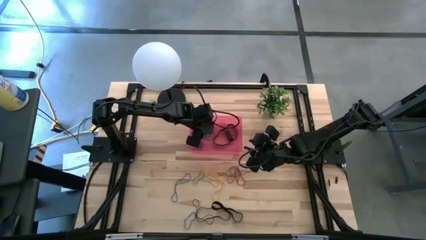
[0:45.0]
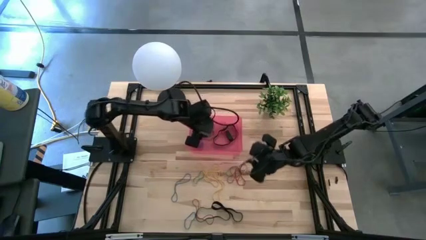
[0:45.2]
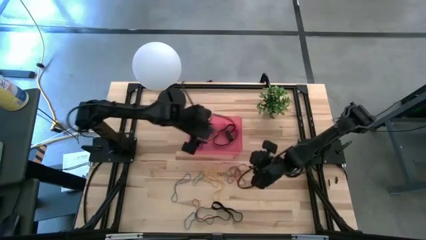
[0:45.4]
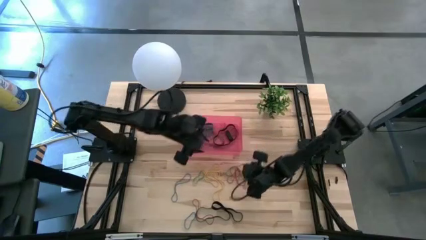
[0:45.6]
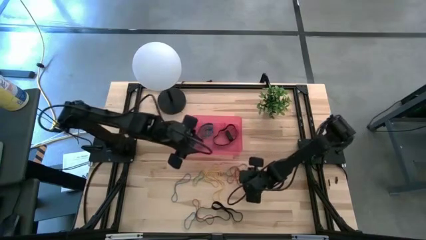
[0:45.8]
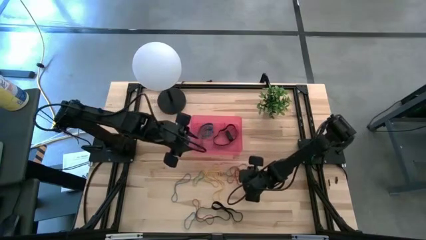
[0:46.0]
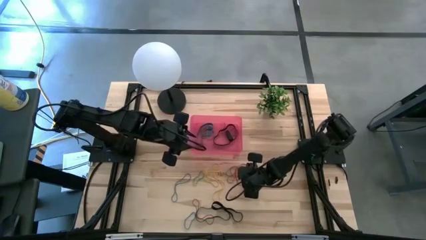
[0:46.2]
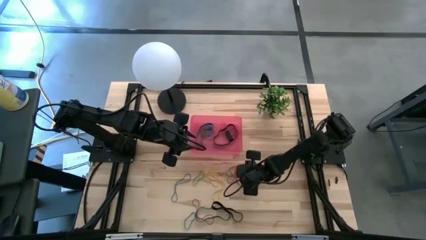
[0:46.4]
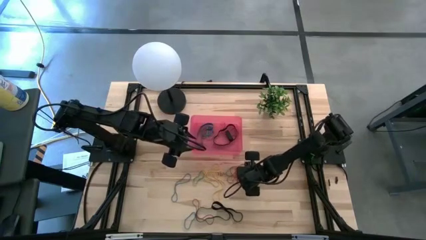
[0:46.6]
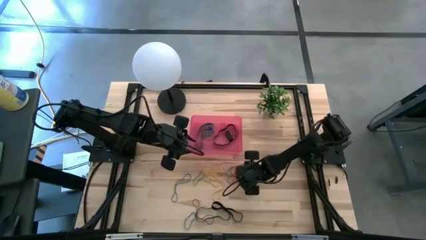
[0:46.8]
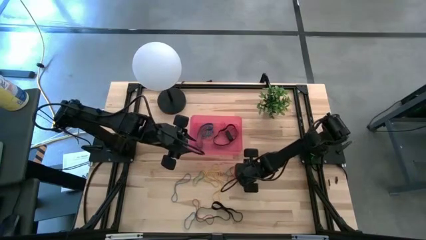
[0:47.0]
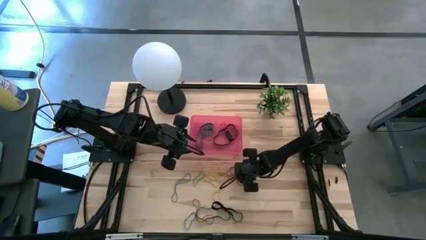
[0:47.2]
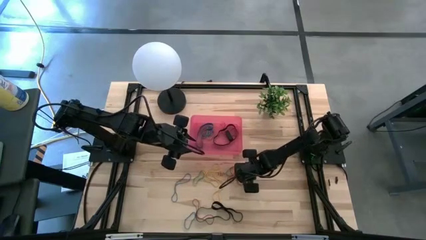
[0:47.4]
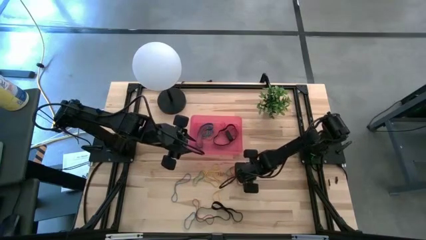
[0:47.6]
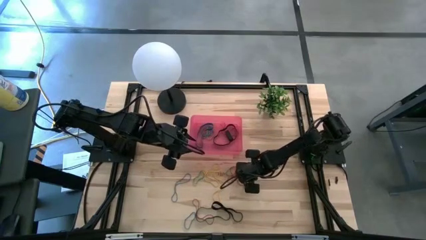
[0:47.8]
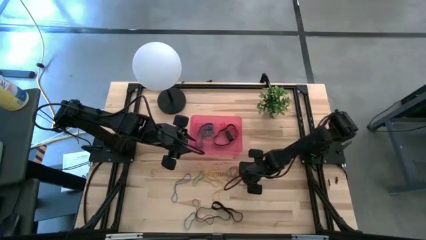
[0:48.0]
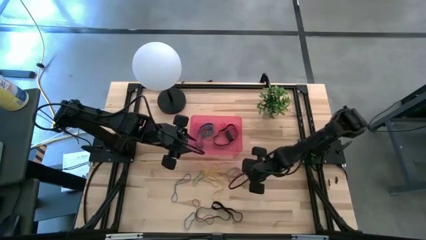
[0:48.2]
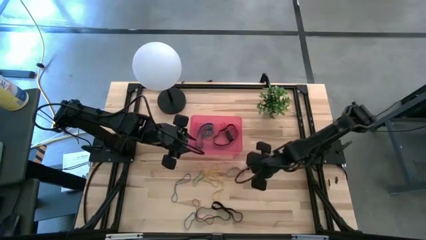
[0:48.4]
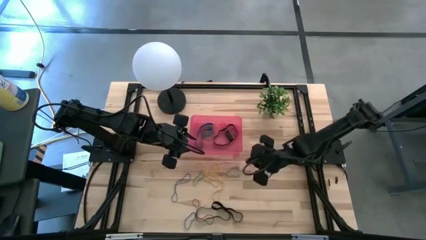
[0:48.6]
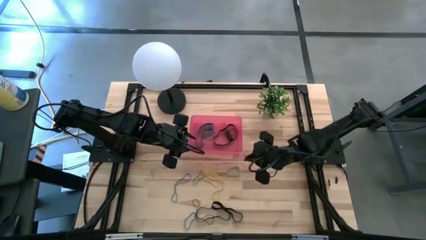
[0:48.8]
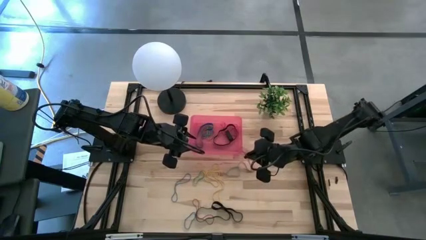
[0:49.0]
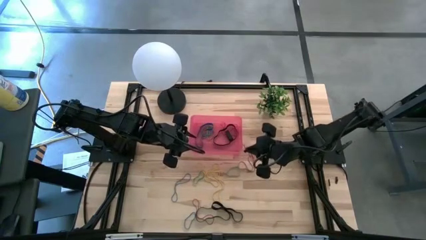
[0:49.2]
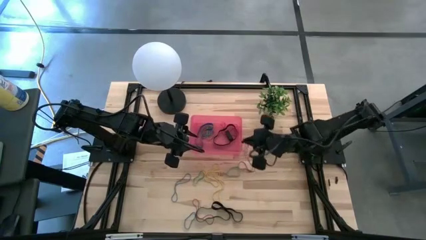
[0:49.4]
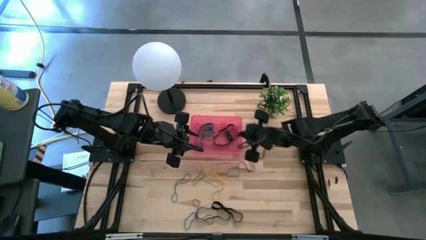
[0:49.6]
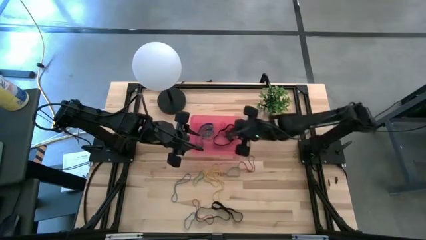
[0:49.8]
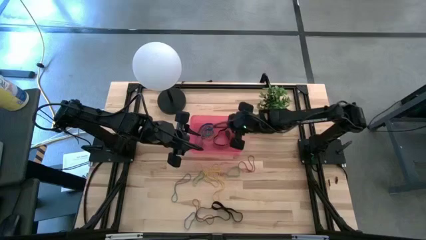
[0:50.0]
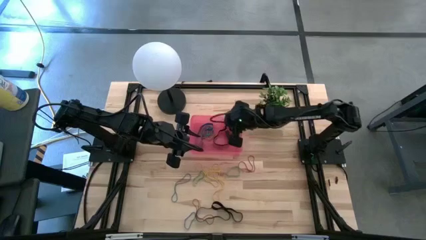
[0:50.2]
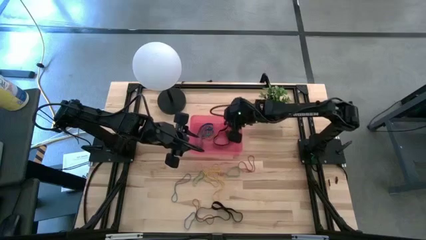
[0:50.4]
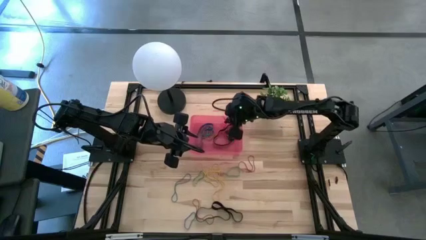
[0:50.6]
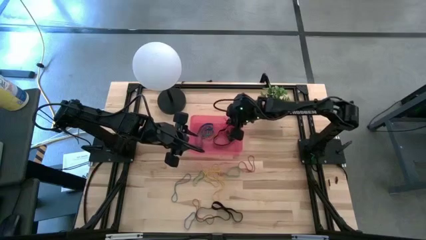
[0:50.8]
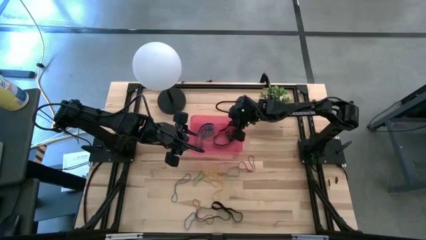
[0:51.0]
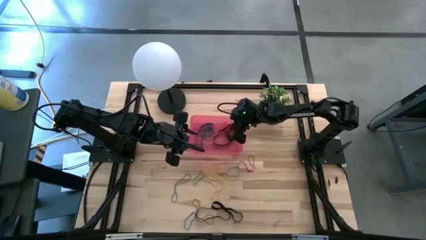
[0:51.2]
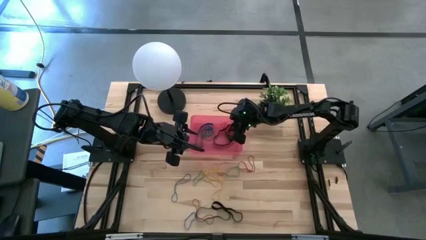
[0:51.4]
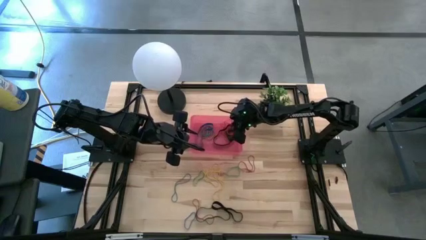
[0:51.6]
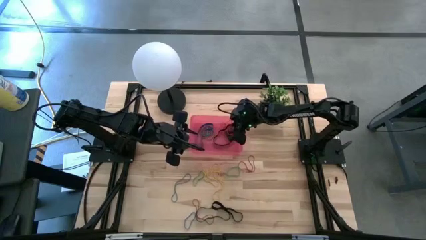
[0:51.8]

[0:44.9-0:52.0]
Task: Pick and place rubber bands into bin
Put the red rubber band into the red bin

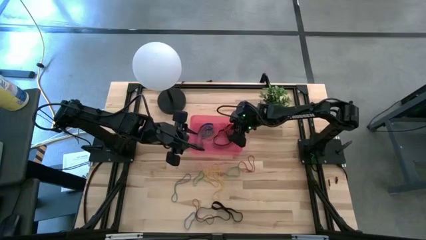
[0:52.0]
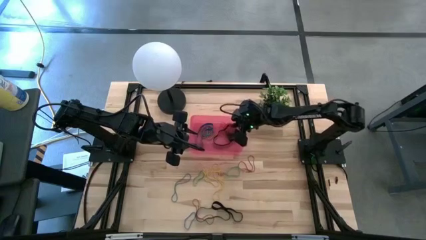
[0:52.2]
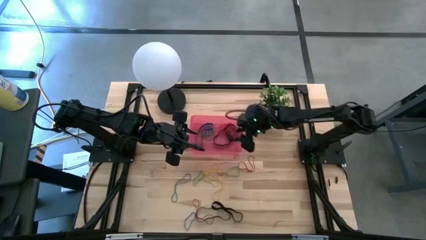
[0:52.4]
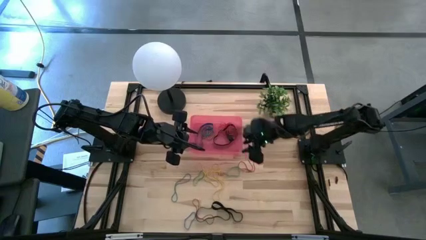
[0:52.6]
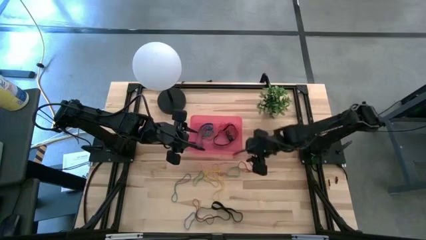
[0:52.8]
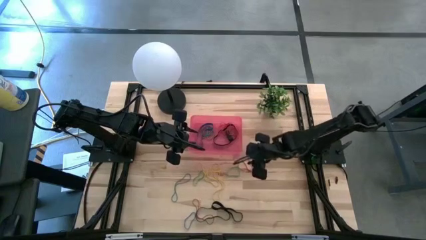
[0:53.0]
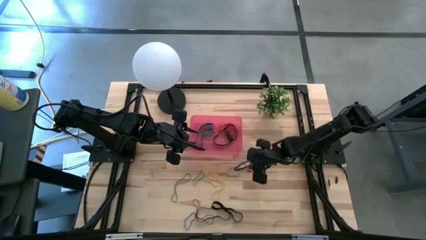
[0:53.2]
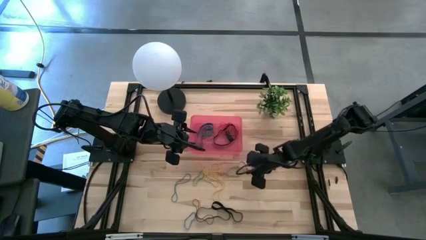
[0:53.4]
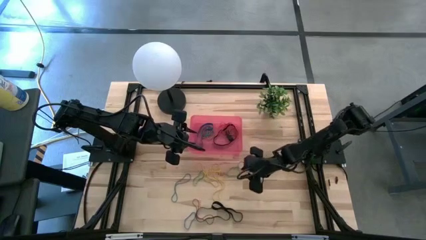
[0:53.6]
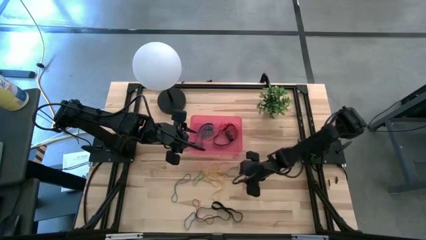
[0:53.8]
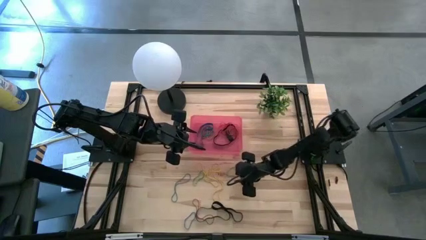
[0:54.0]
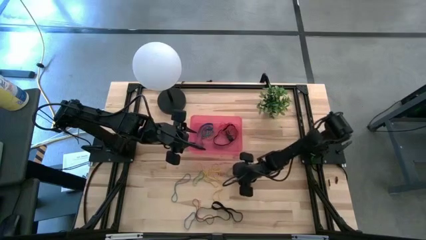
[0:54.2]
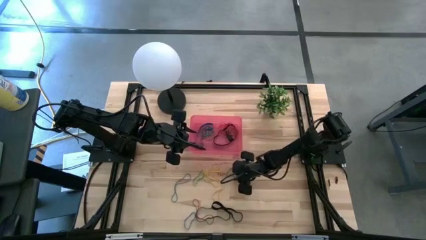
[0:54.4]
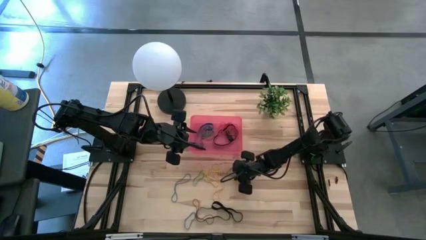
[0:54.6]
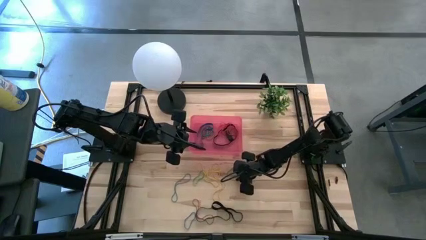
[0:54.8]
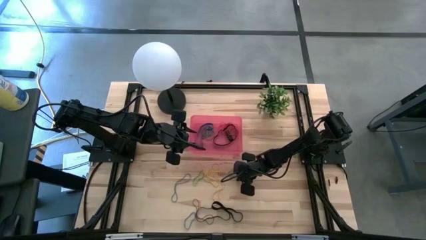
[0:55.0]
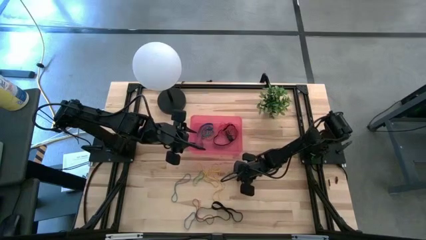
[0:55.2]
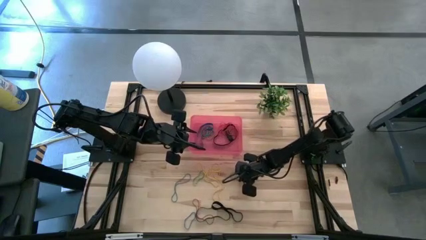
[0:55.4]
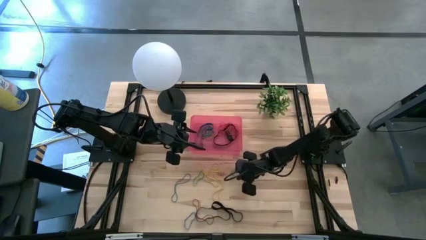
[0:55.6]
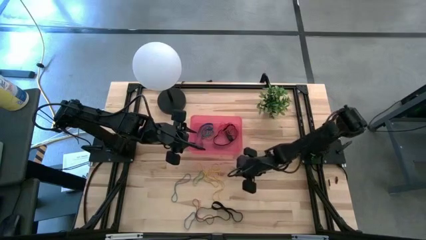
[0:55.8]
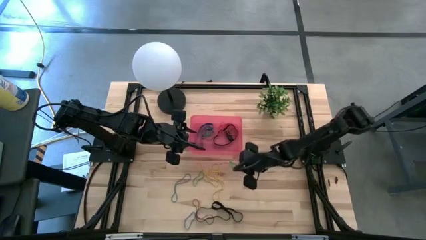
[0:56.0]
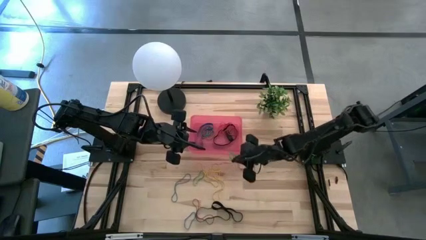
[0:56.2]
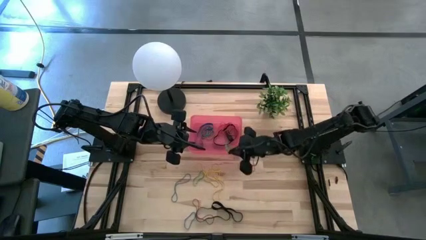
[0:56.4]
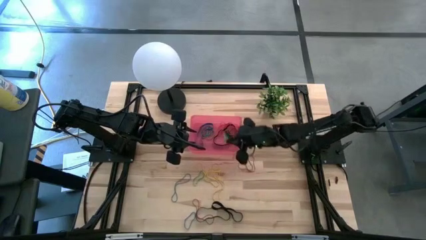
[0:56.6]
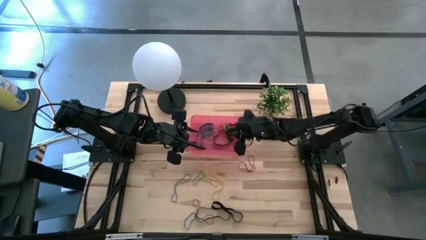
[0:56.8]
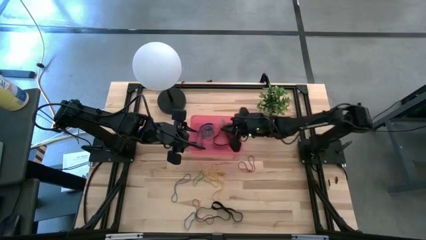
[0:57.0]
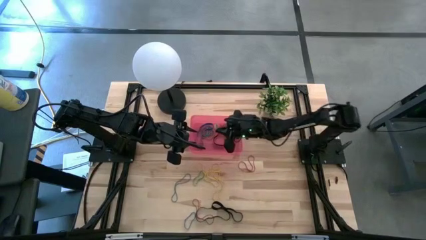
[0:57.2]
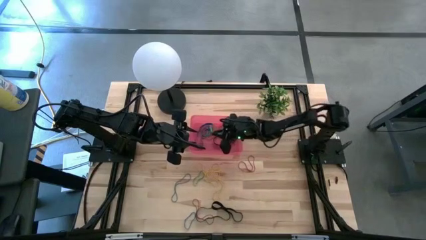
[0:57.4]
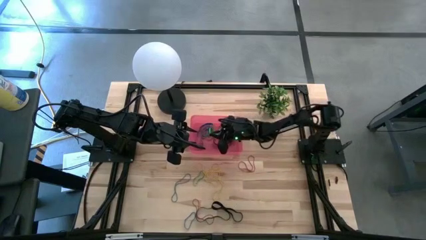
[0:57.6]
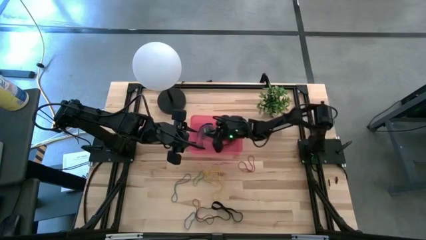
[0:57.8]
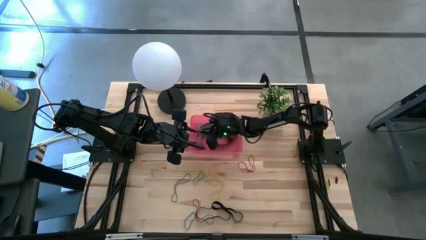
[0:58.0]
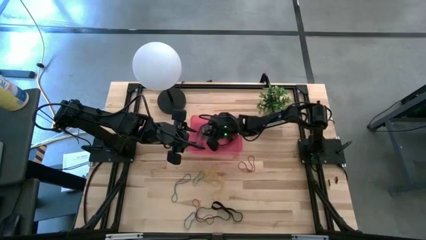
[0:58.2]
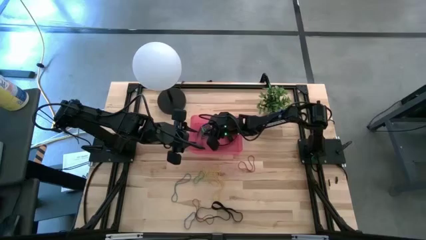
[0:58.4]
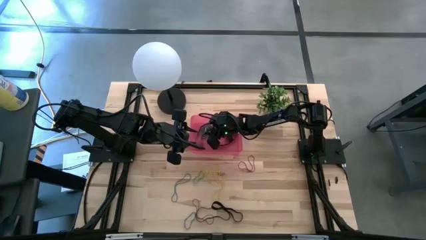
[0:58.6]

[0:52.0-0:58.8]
Put the green rubber band into the red bin

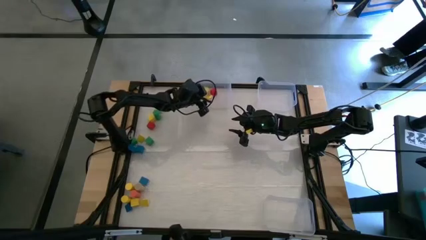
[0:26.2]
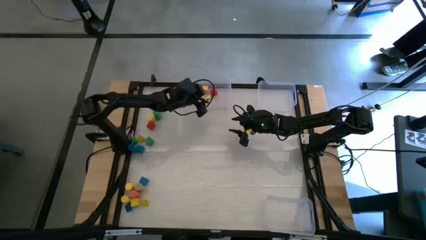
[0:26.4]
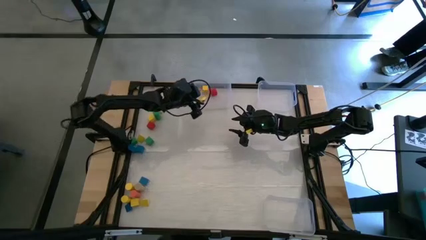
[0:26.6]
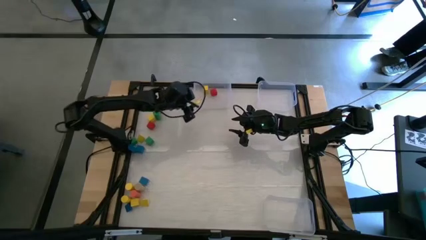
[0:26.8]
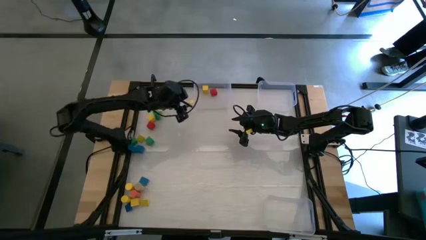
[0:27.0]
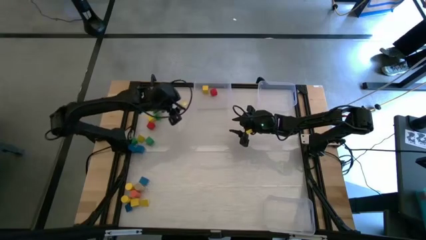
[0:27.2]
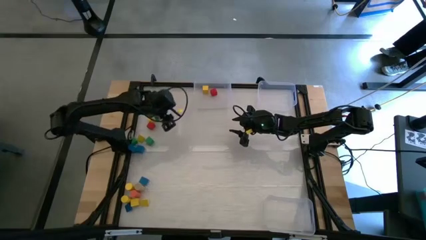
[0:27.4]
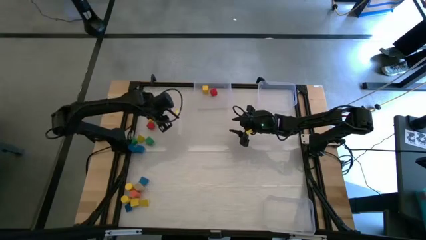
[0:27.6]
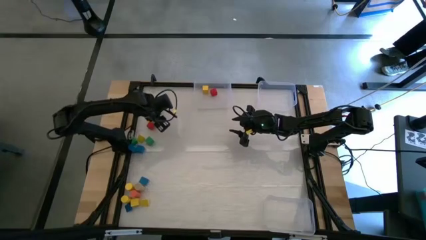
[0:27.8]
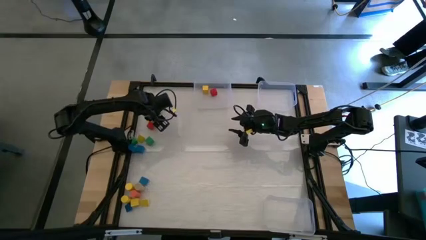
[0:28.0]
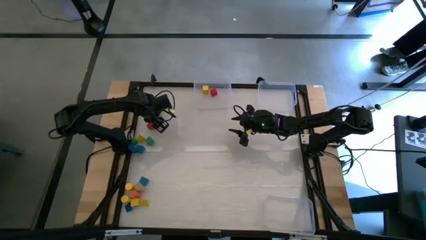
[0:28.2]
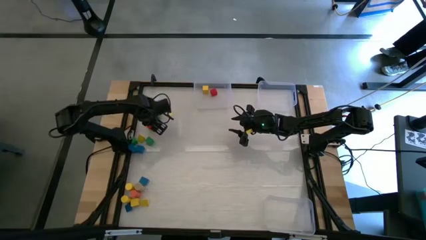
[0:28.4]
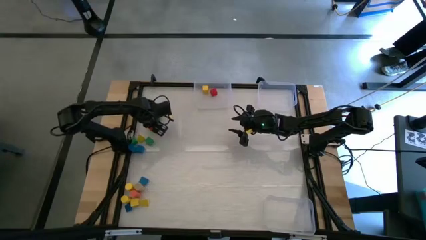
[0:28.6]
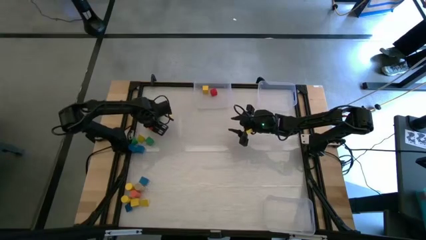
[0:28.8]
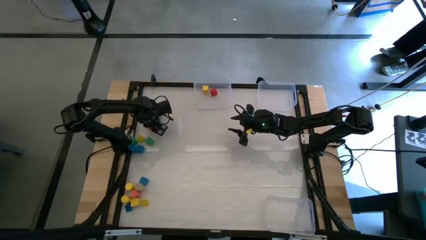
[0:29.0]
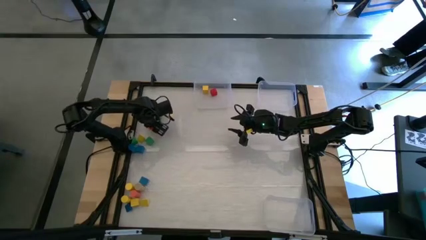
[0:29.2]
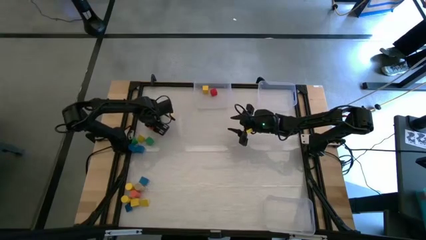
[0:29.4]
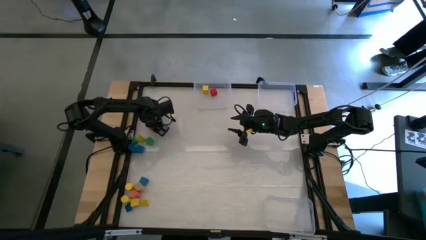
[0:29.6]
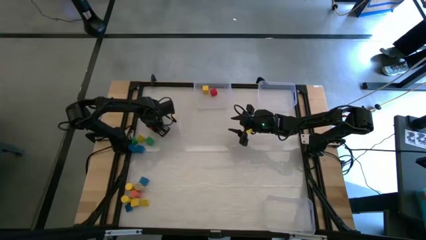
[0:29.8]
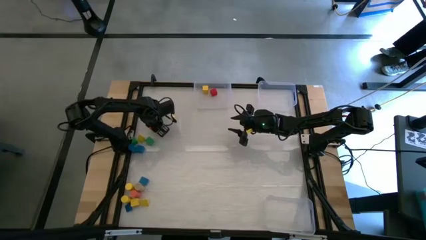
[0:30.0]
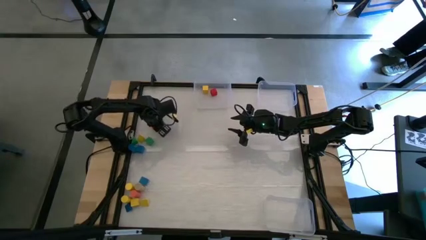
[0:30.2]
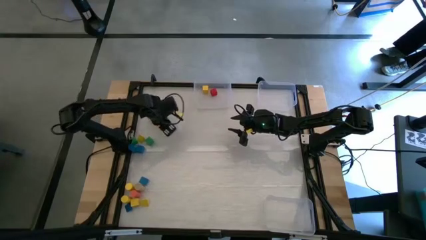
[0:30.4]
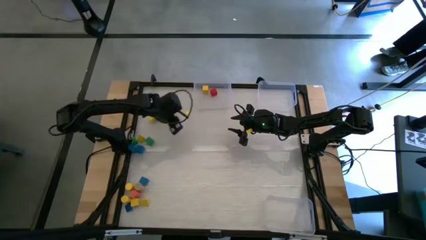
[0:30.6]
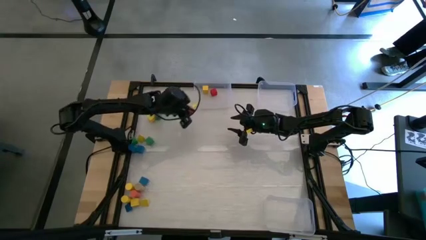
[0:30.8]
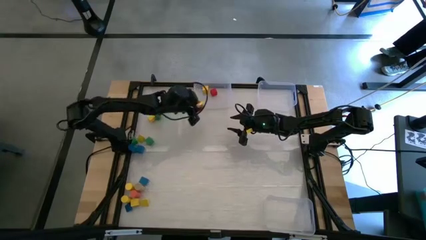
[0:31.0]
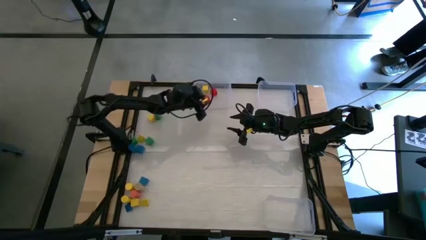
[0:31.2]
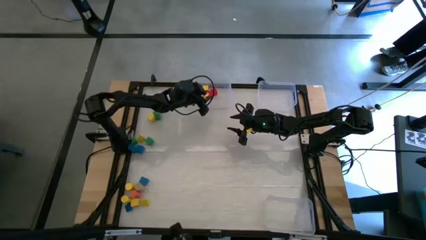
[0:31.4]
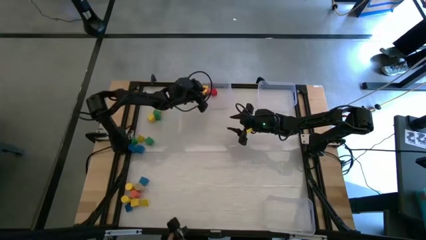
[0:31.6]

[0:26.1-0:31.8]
Task: Sort blocks by size
Put the square red block into the top left transparent bin
